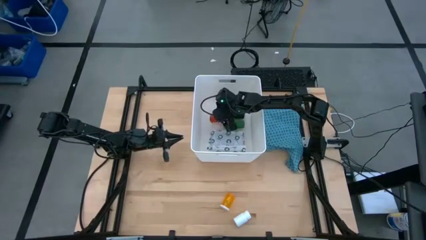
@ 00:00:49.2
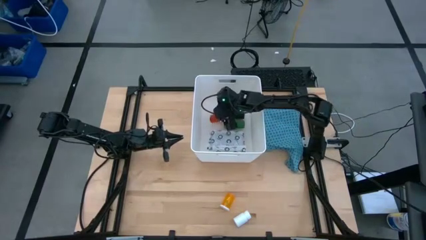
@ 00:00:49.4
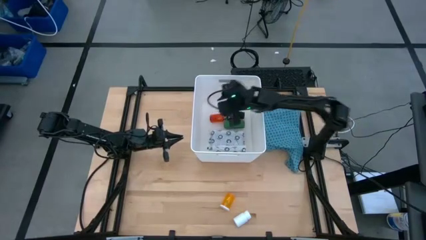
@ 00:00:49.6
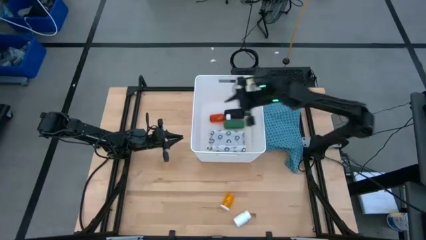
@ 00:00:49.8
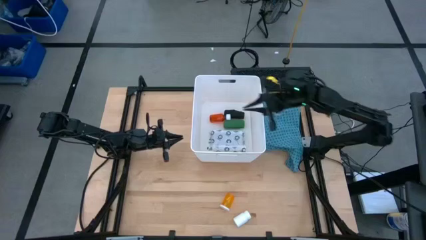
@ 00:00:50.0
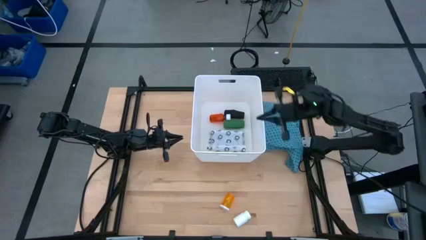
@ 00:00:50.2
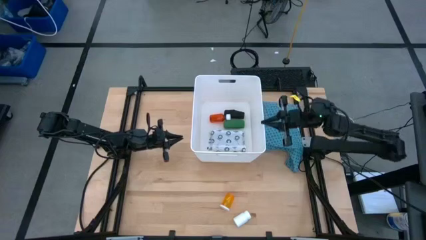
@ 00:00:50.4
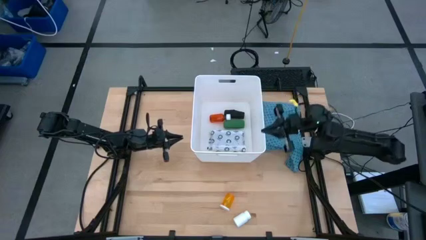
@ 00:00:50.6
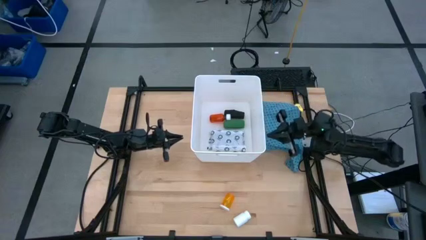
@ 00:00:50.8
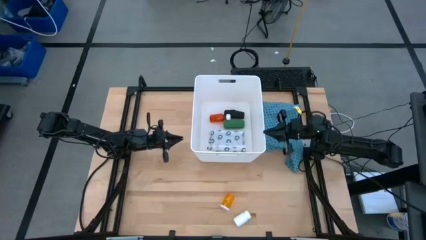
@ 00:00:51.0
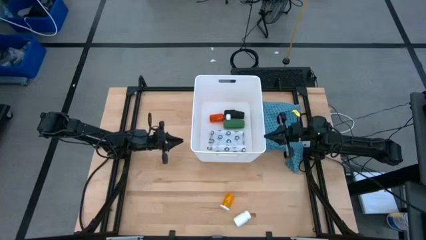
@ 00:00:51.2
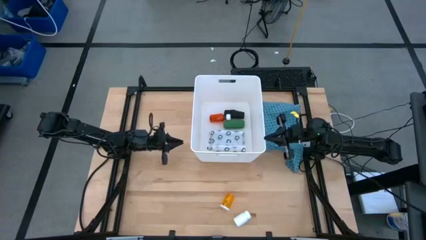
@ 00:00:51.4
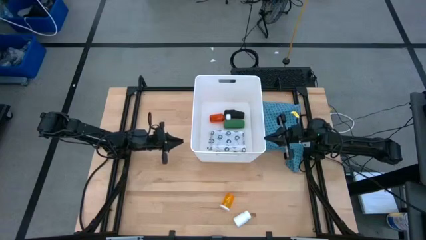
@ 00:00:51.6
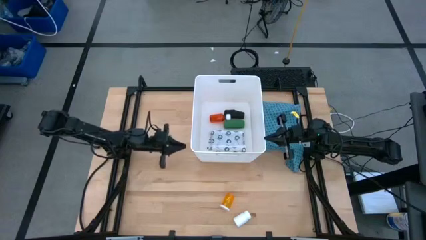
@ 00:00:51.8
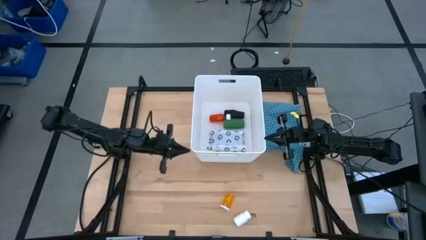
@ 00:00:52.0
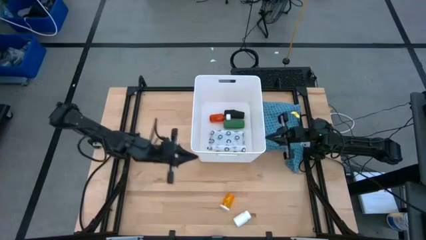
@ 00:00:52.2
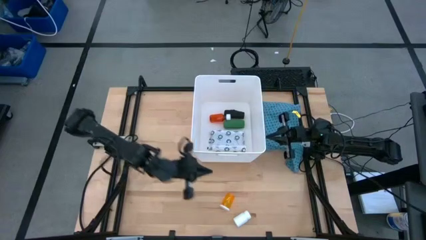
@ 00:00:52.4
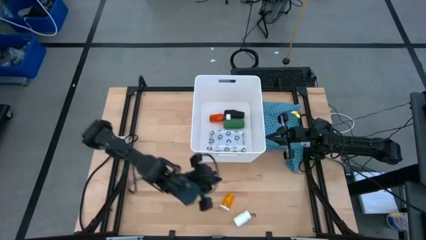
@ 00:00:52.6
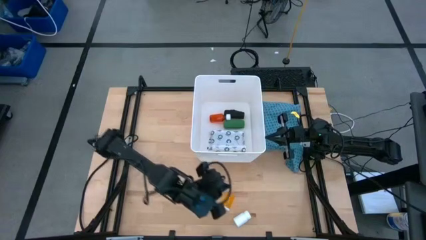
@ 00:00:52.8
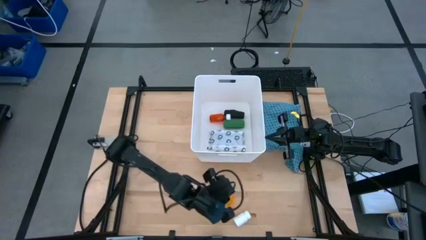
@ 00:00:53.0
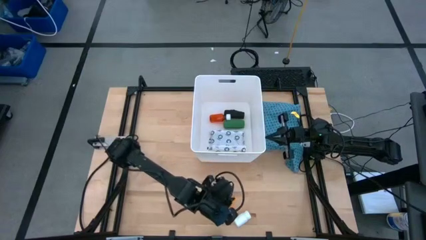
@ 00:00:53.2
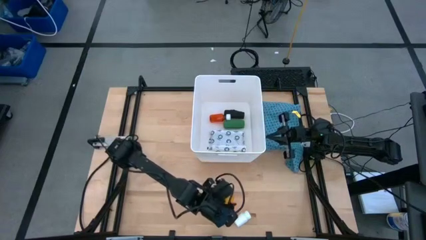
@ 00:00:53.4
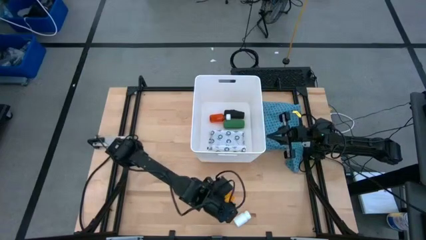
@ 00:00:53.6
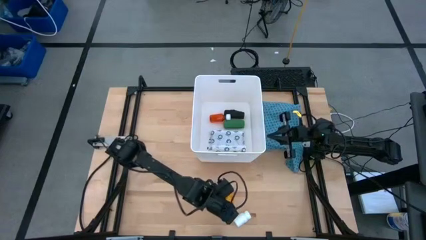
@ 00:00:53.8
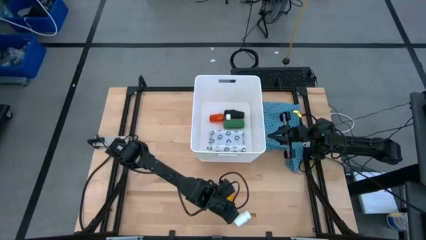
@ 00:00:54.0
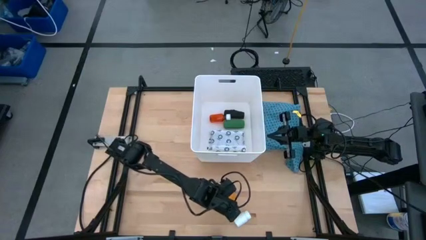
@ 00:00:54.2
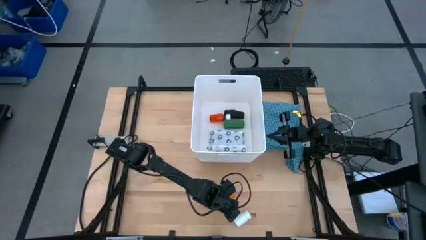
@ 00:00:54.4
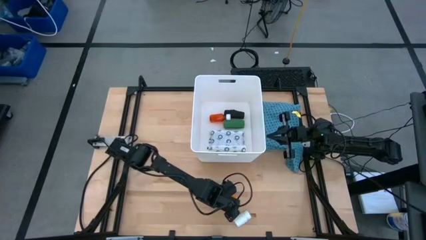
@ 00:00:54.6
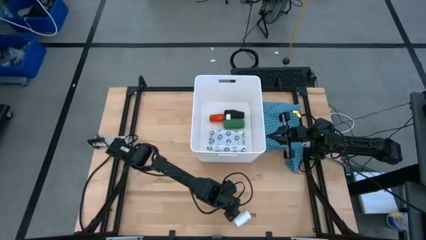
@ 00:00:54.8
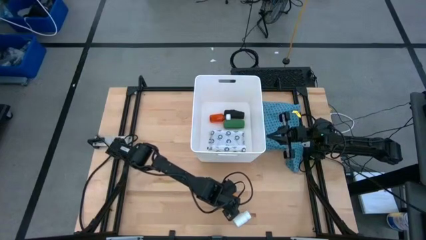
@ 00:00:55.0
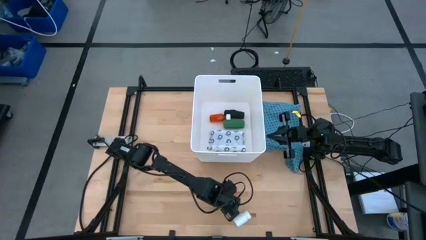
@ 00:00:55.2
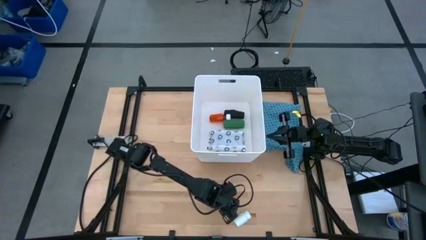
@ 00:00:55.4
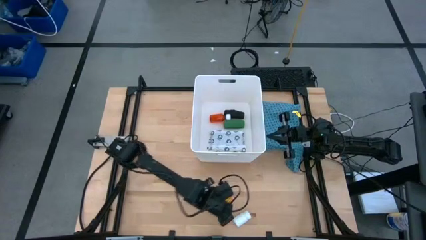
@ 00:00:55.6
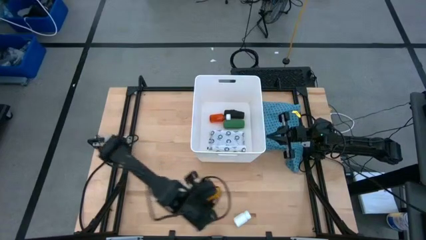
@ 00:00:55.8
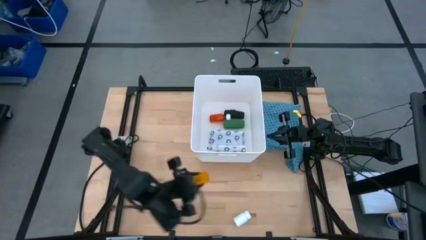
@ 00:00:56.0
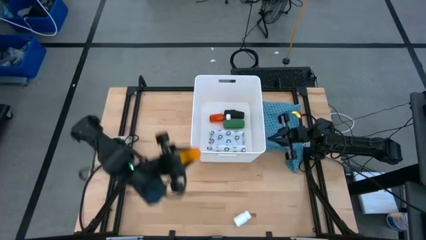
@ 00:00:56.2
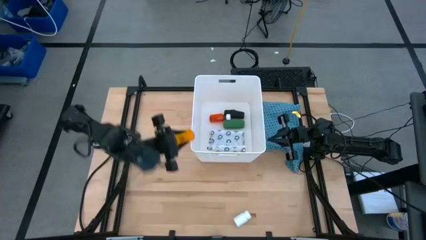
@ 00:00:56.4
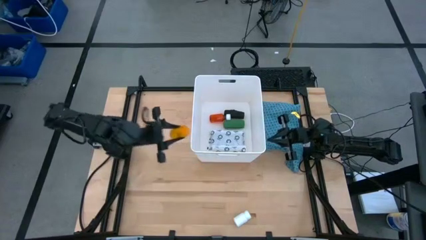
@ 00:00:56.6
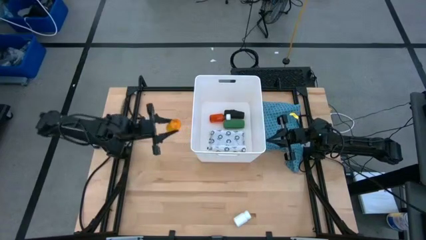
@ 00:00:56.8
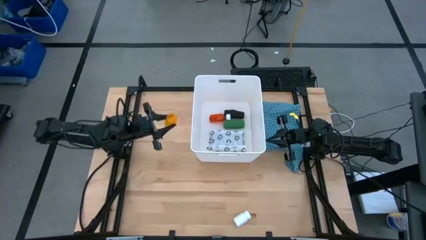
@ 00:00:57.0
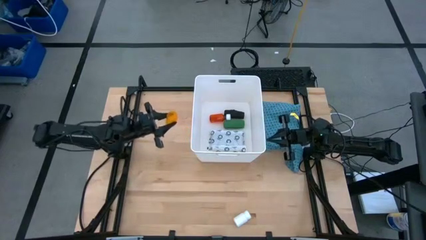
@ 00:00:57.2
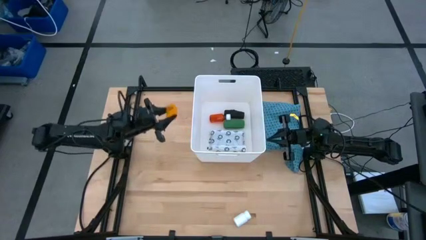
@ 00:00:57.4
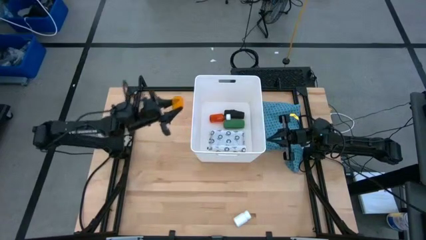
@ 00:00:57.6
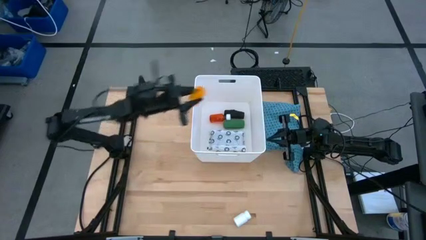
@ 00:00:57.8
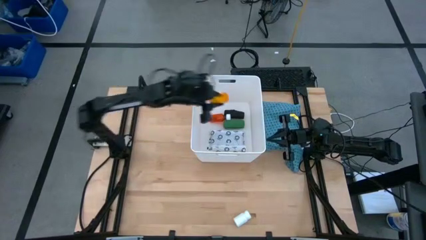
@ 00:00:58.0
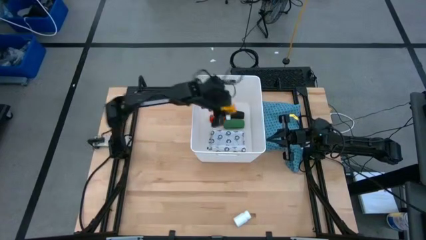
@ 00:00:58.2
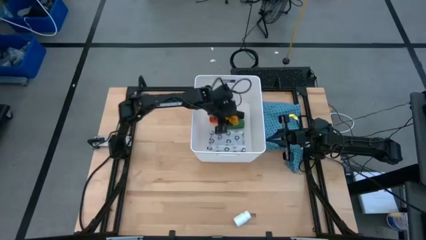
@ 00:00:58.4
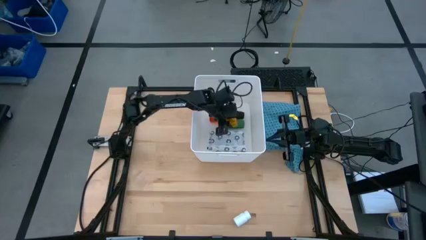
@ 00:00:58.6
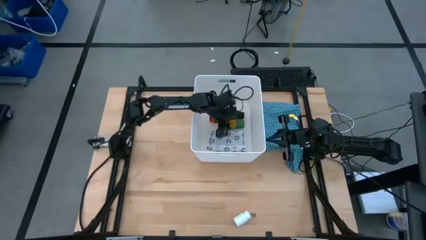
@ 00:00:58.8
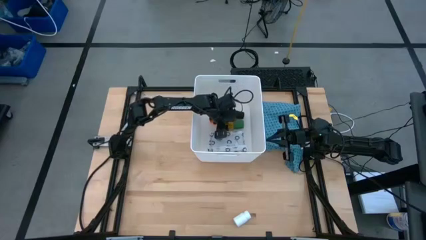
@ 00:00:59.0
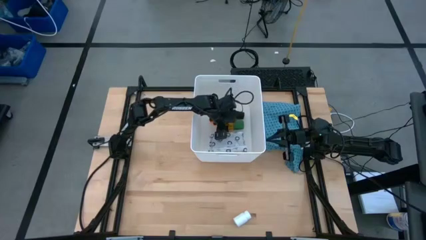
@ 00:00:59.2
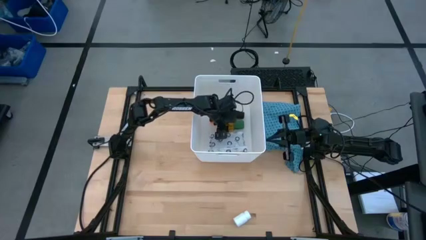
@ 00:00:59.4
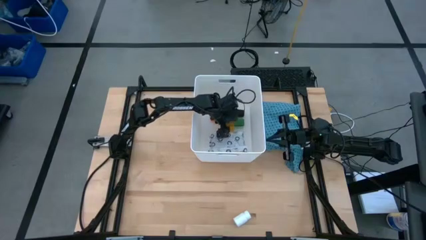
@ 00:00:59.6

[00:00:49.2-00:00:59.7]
Task: Pick & place medical supplies in basket/bin
Put the orange medicine bottle into the white bin
